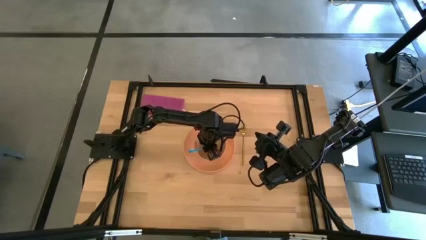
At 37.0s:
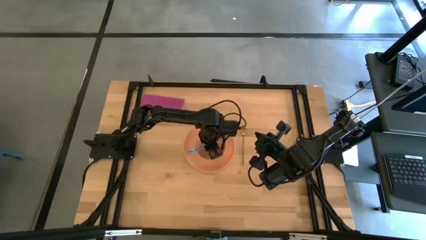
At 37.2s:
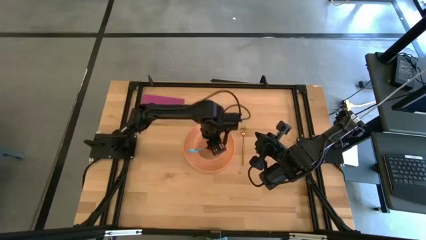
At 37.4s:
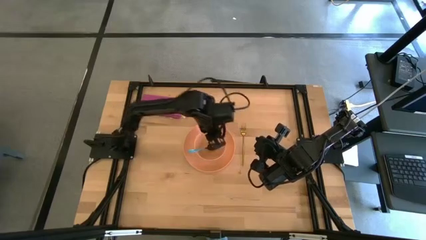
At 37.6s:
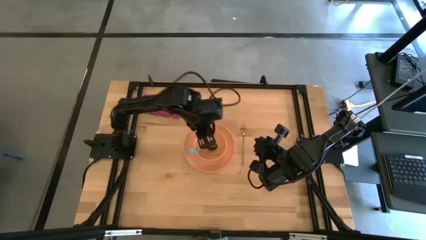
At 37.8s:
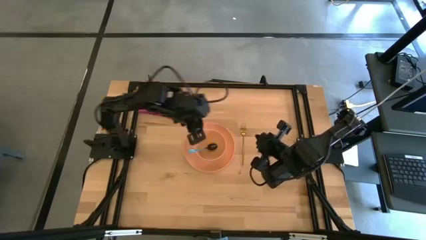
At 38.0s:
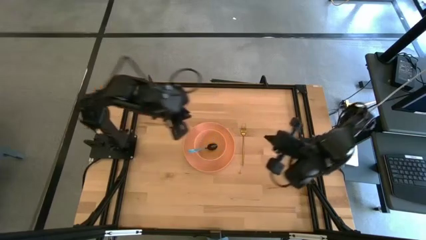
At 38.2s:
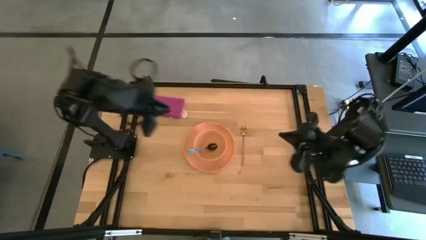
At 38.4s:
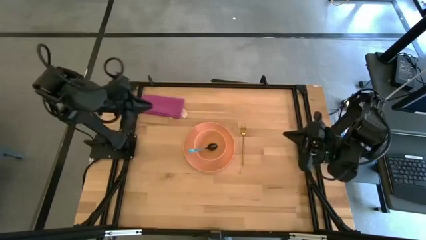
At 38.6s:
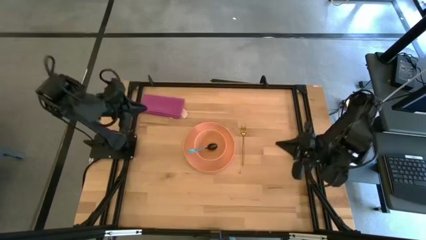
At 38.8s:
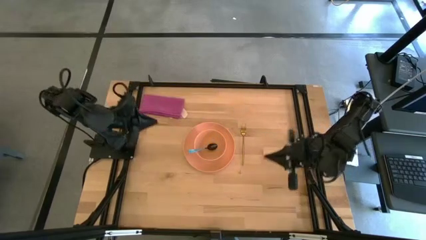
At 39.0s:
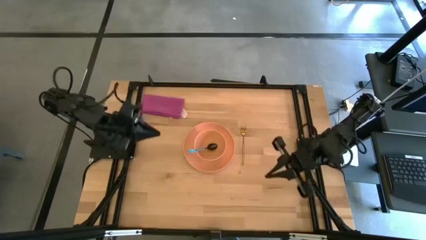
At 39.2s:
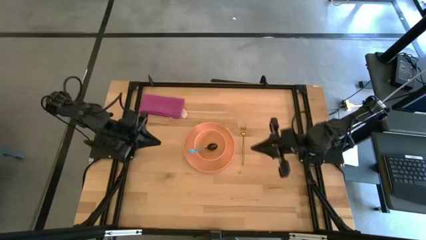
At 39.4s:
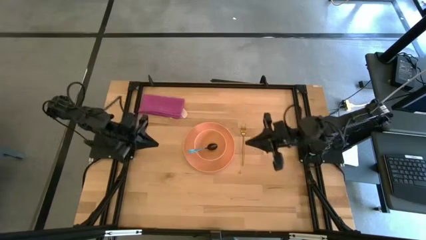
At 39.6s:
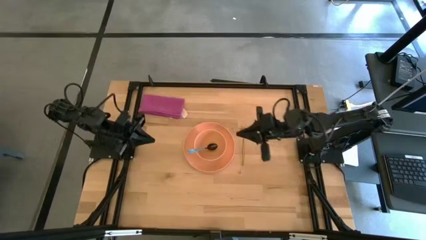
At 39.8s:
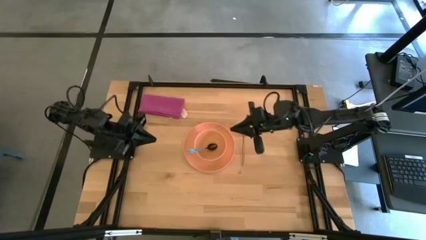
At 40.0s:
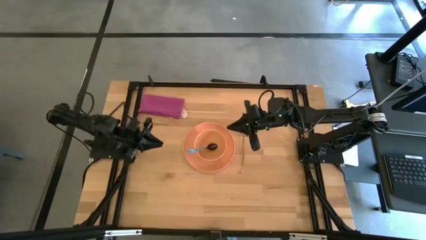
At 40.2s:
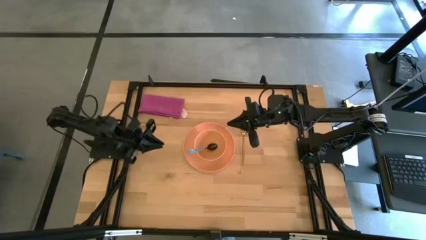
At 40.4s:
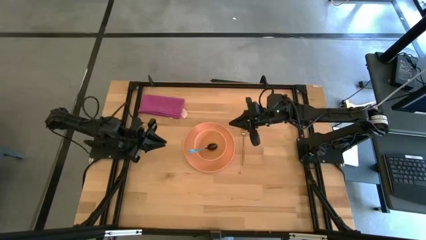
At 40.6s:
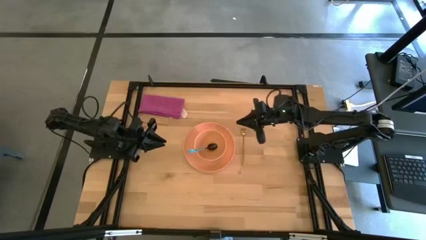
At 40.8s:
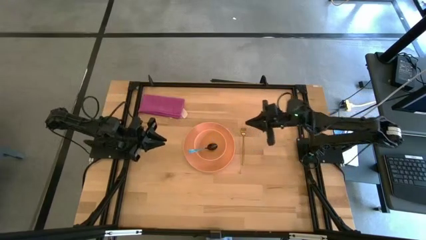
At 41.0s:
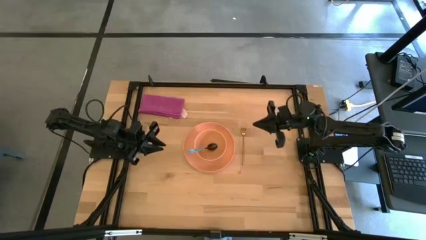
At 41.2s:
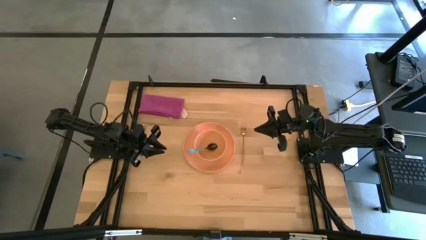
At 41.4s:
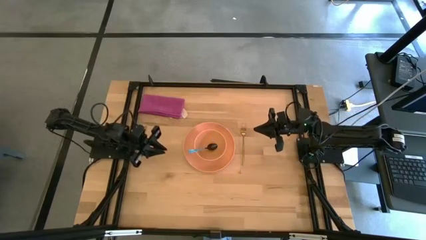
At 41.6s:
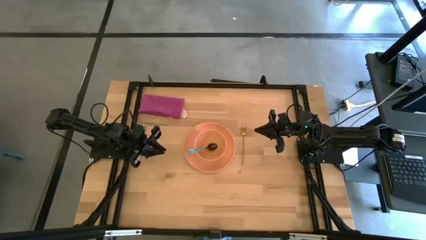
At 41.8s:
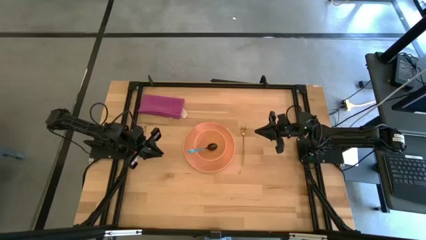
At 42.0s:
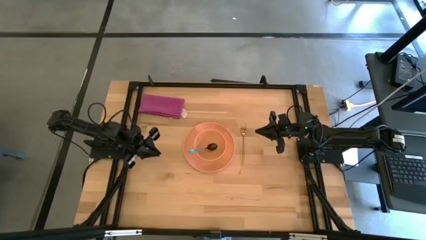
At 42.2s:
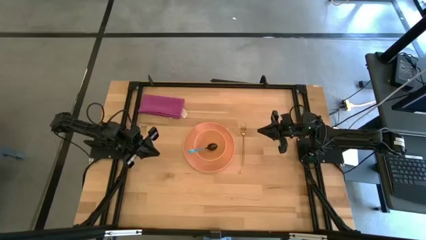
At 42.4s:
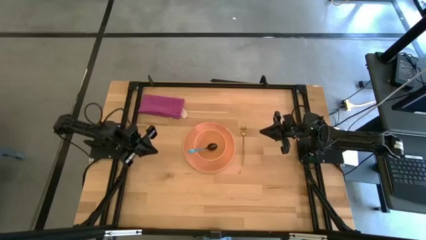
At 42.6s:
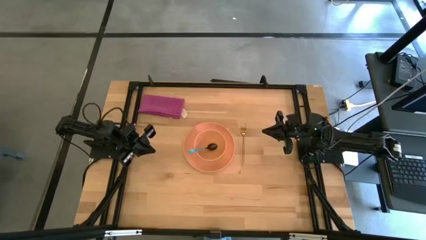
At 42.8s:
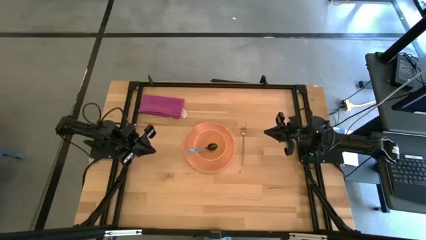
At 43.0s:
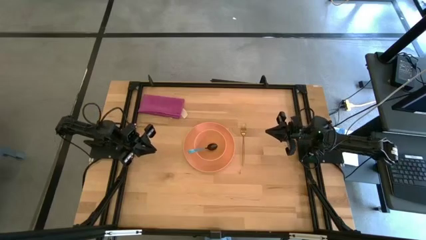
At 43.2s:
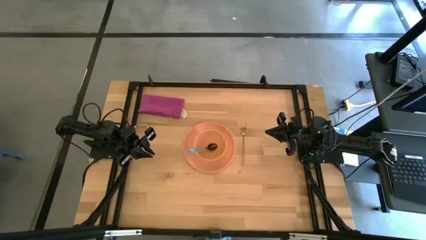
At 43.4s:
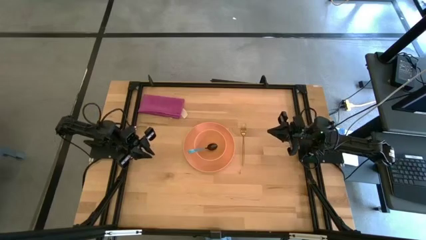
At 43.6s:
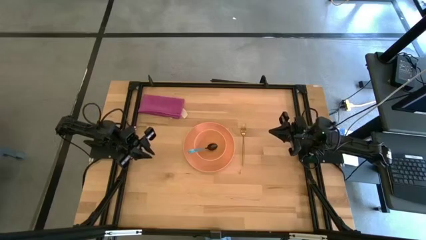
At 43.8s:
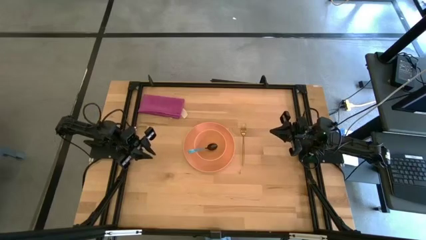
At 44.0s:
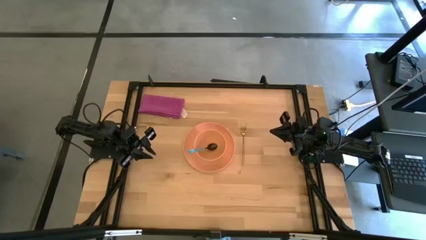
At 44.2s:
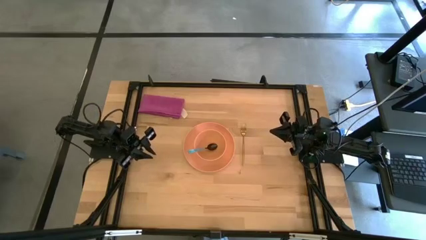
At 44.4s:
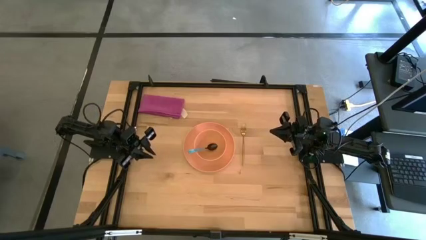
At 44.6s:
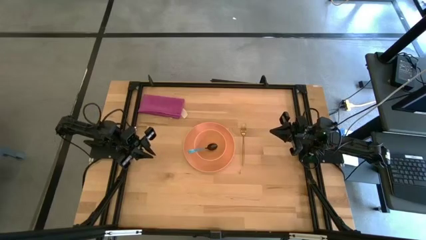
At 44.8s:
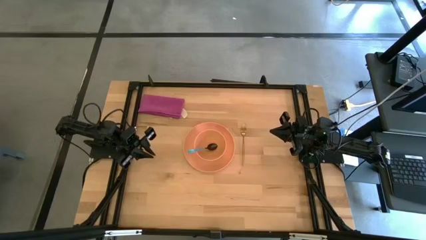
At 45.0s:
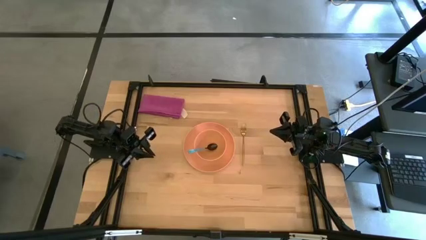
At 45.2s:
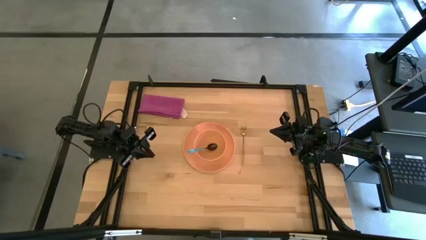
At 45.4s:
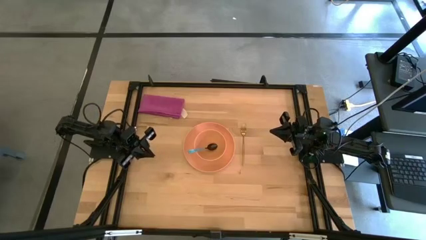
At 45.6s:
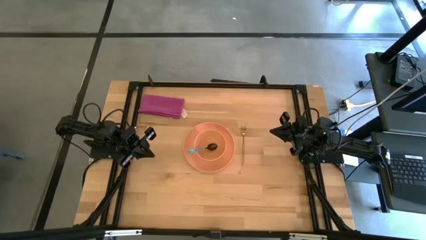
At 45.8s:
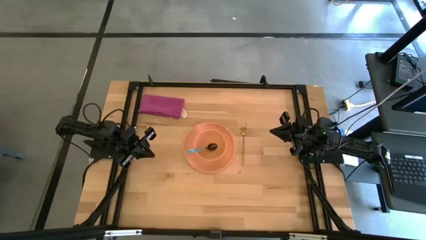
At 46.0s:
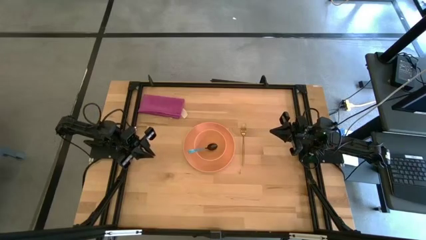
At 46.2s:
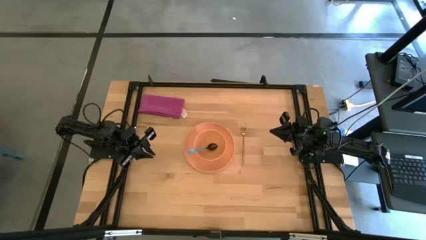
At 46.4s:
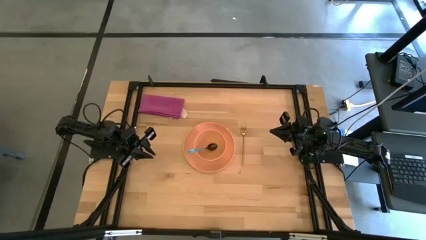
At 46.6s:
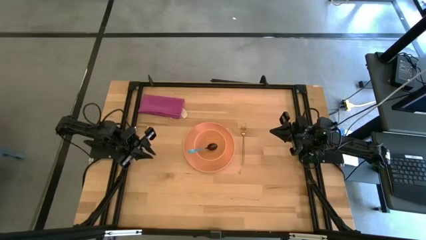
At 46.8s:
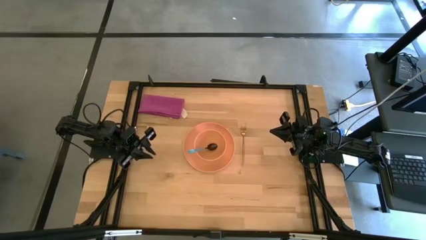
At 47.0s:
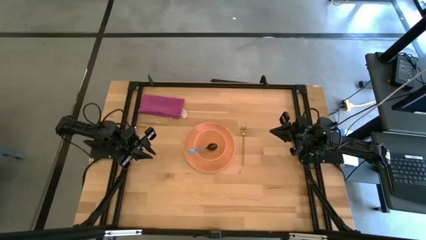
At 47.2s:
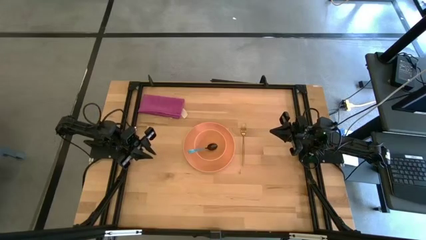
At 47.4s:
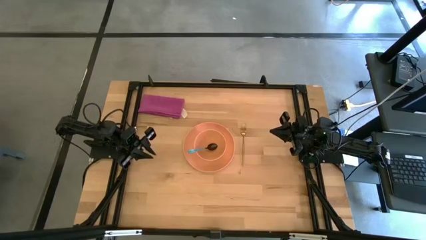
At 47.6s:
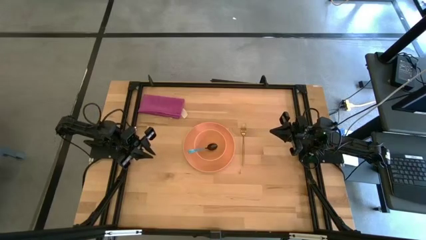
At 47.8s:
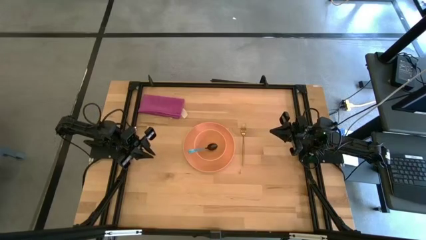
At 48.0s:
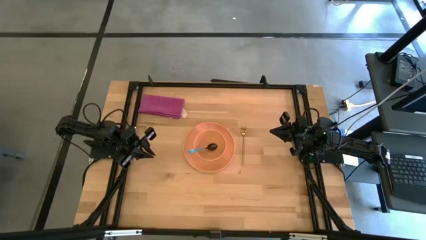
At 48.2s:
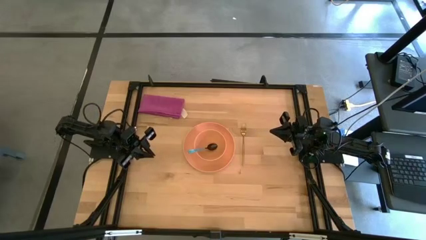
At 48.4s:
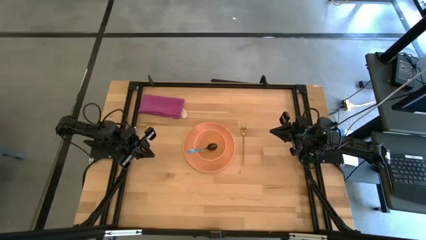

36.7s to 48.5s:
Task: Set table place
Return to Home Position

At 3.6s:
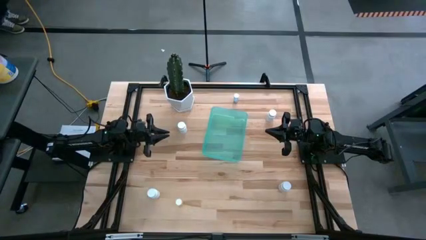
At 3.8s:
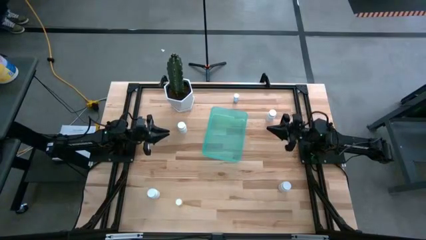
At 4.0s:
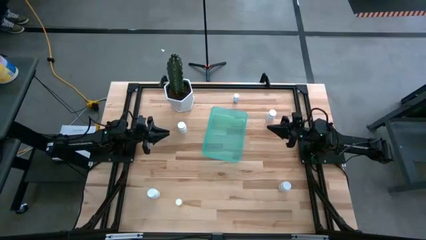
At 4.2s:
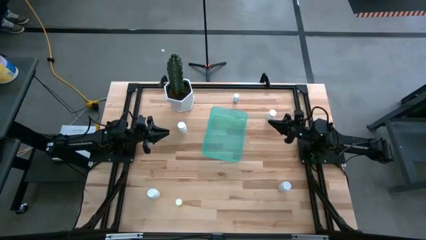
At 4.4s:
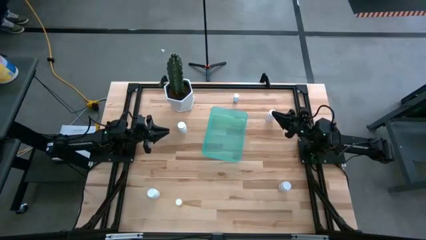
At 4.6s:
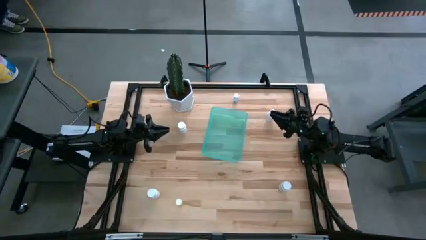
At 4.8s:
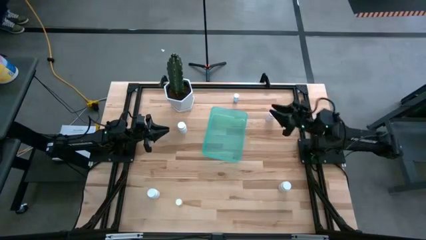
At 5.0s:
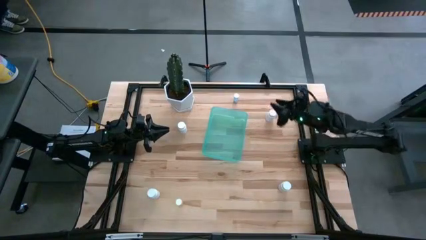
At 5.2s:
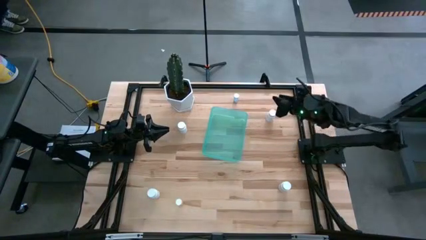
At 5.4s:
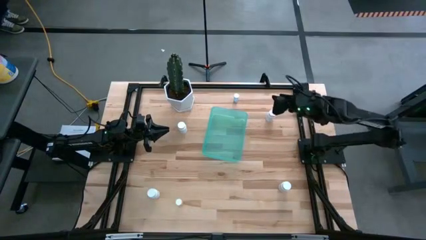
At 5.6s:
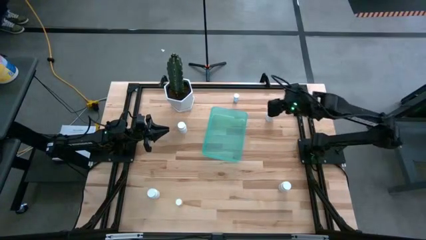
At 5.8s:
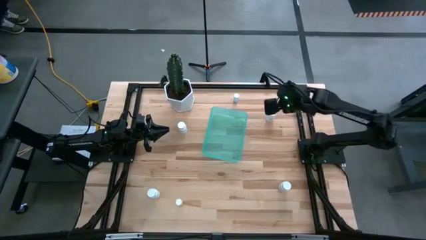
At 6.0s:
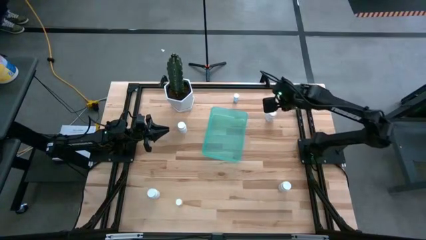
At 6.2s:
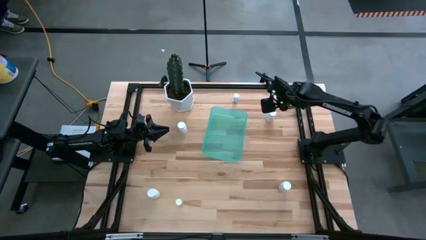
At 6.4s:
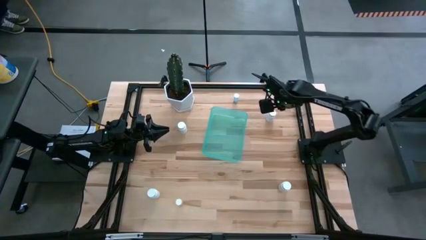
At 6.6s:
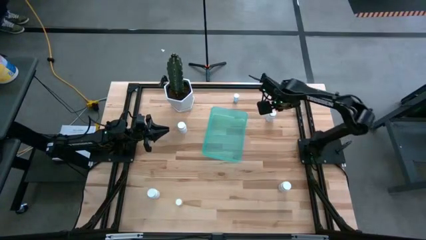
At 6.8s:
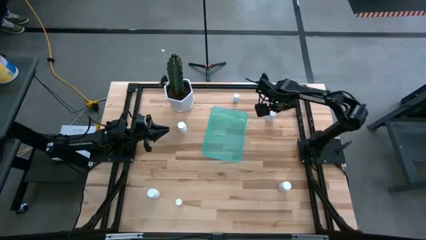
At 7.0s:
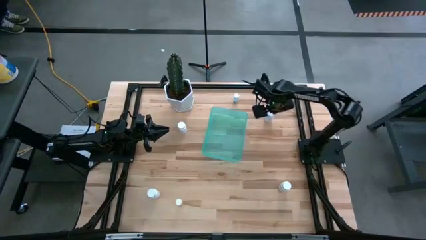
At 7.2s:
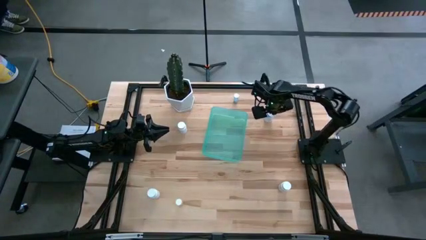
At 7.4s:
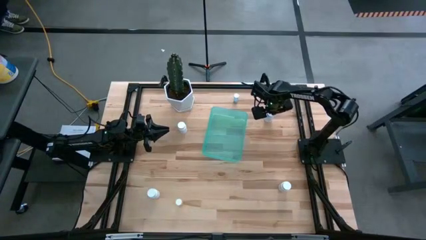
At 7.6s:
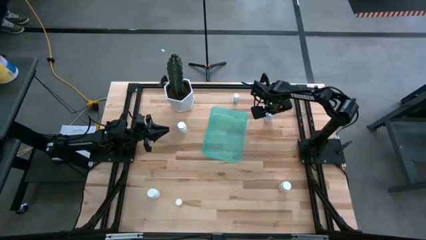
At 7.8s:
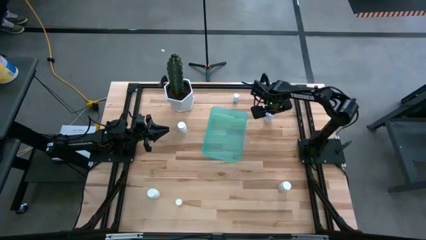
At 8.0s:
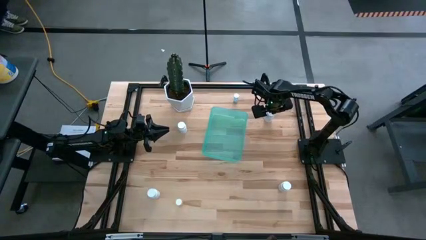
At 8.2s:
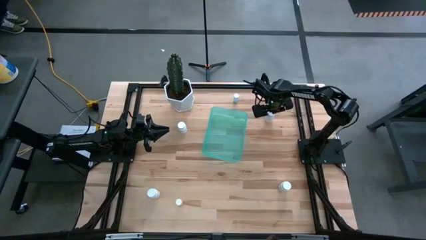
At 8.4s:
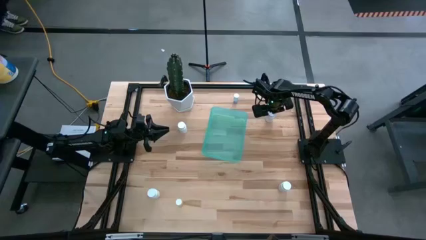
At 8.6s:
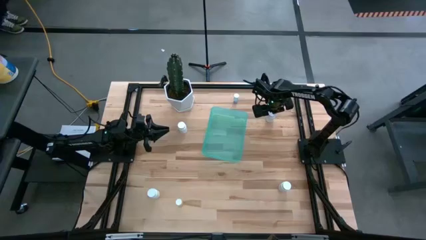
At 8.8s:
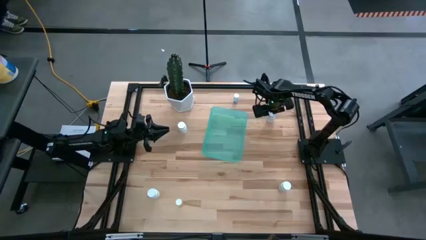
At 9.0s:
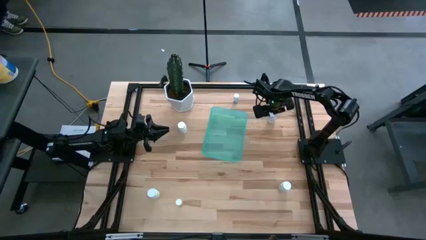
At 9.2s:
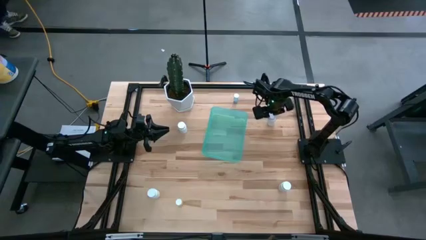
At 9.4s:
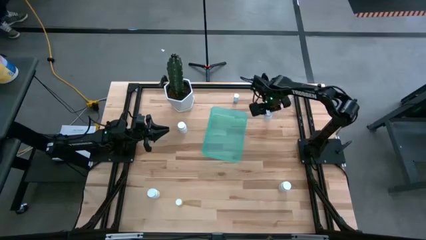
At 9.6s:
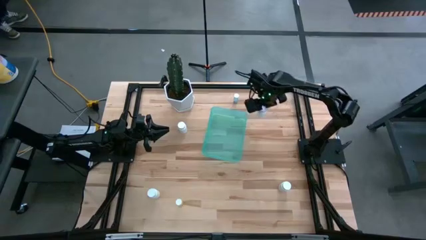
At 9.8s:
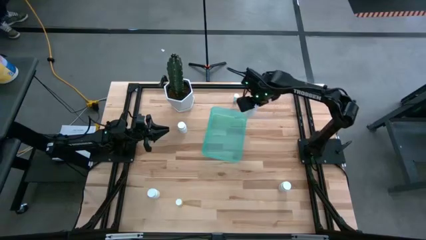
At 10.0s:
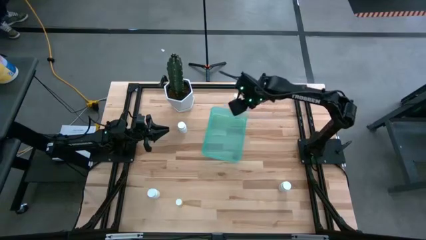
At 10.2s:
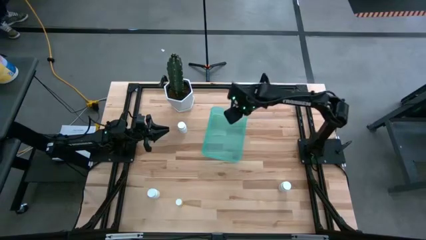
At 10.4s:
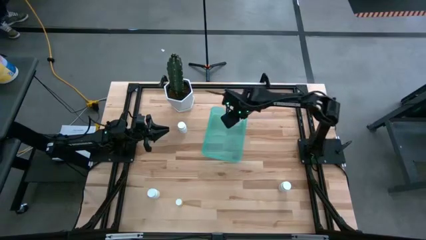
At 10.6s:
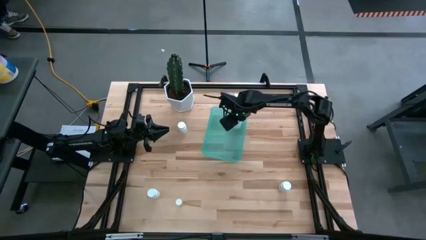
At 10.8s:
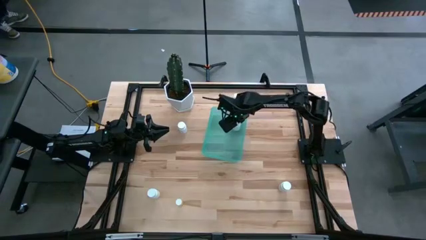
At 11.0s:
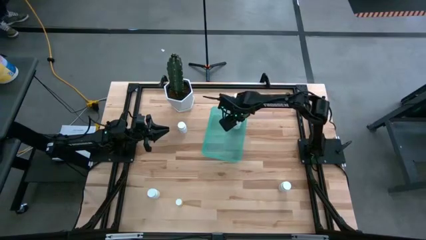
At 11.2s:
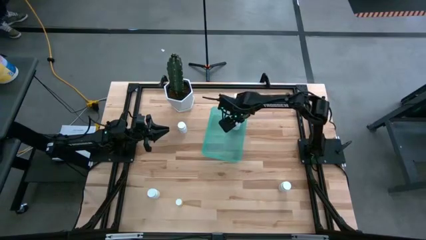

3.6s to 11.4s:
Task: Pick and place pill bottles into a basket
Put the white pill bottle into the blue bin
